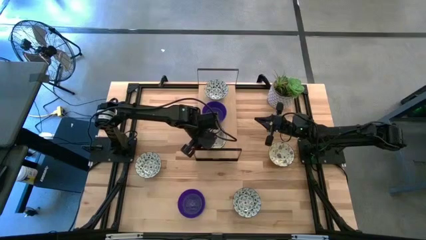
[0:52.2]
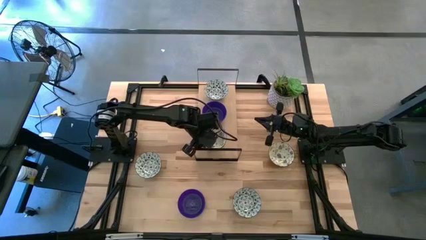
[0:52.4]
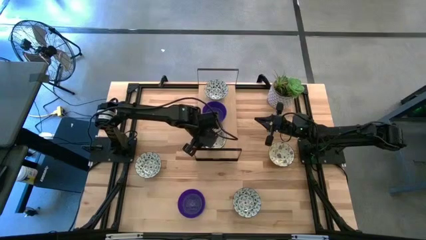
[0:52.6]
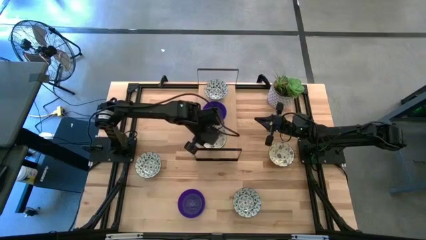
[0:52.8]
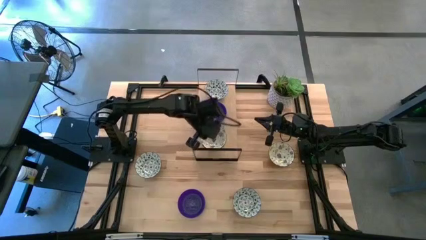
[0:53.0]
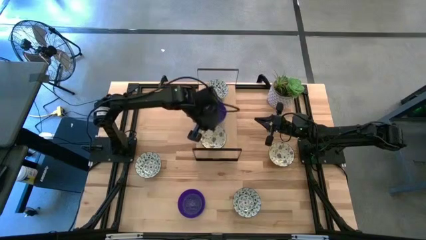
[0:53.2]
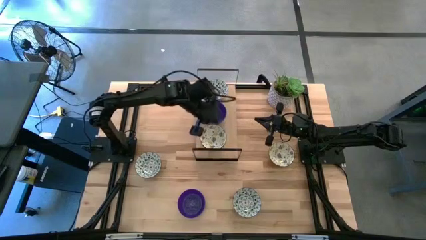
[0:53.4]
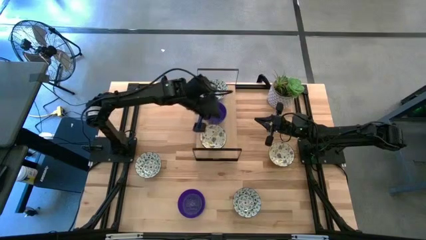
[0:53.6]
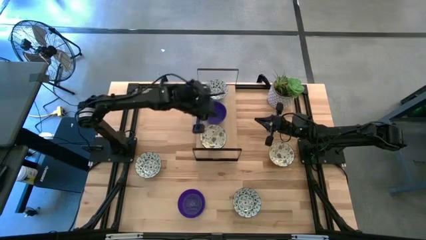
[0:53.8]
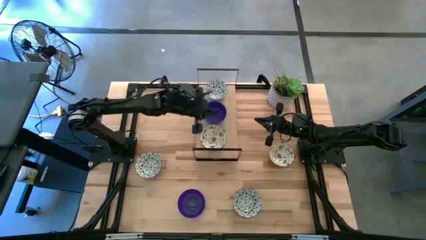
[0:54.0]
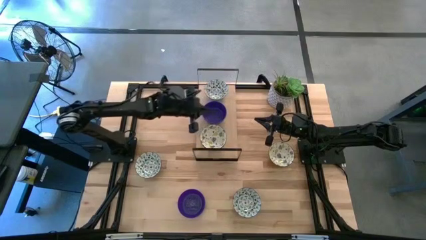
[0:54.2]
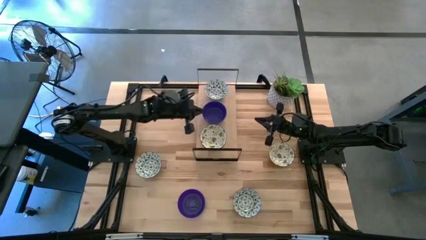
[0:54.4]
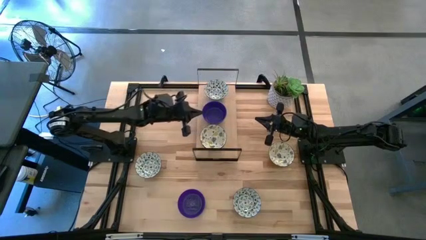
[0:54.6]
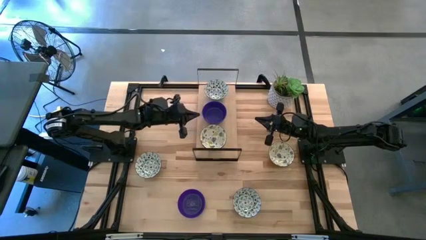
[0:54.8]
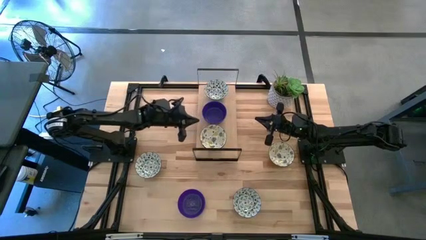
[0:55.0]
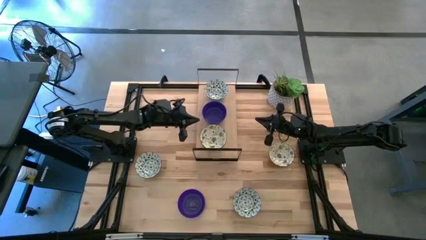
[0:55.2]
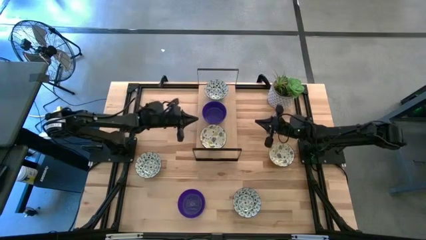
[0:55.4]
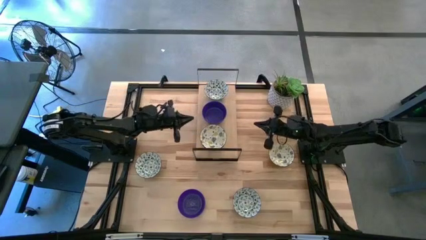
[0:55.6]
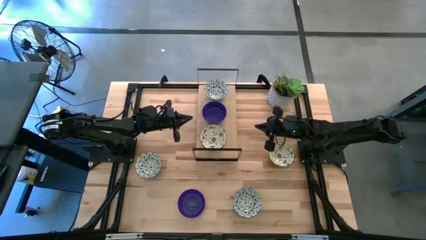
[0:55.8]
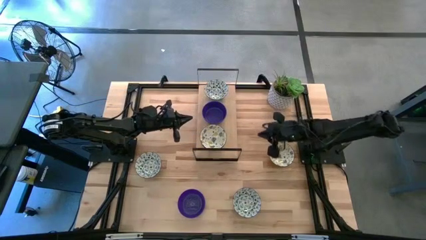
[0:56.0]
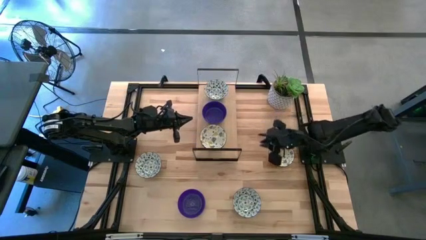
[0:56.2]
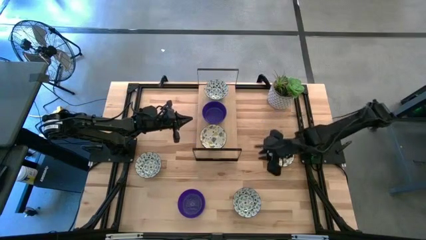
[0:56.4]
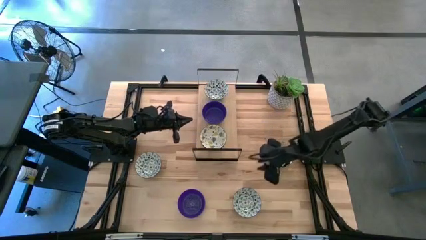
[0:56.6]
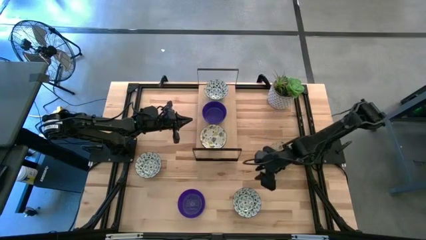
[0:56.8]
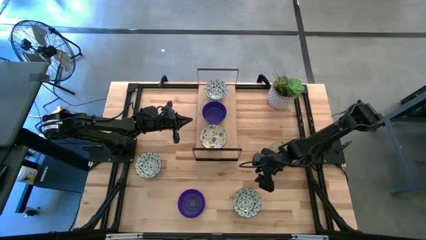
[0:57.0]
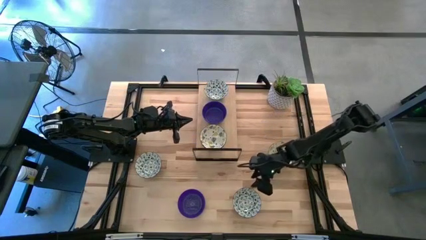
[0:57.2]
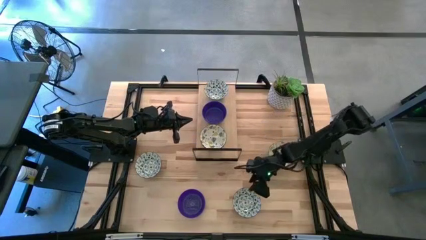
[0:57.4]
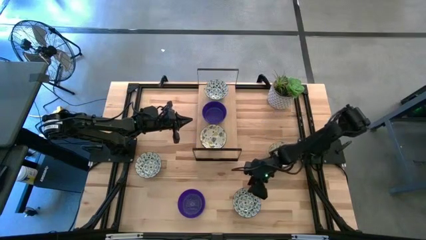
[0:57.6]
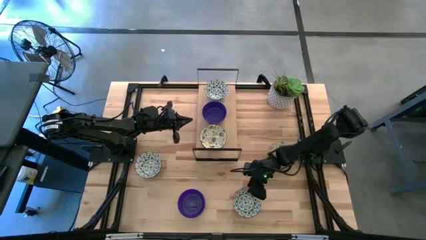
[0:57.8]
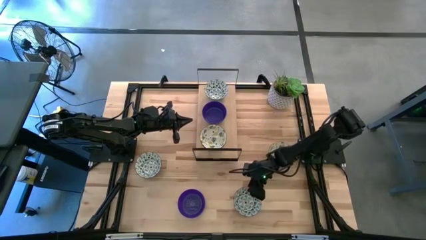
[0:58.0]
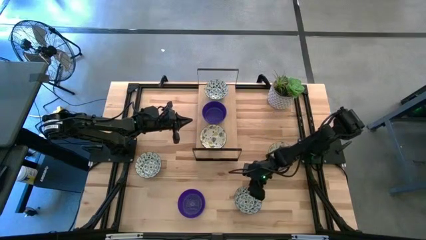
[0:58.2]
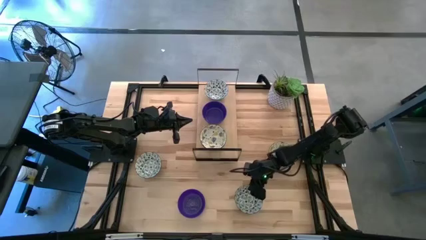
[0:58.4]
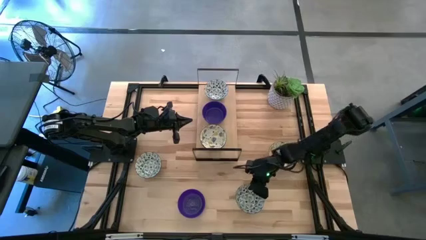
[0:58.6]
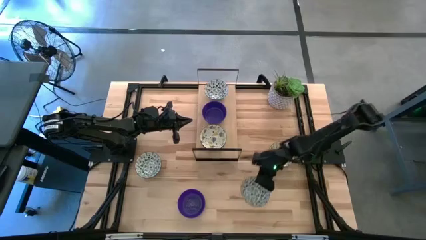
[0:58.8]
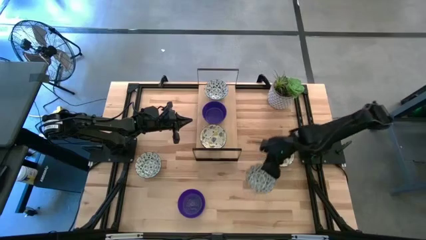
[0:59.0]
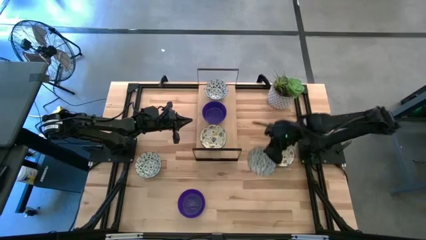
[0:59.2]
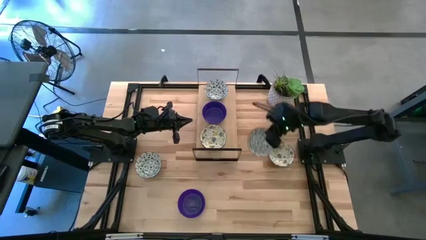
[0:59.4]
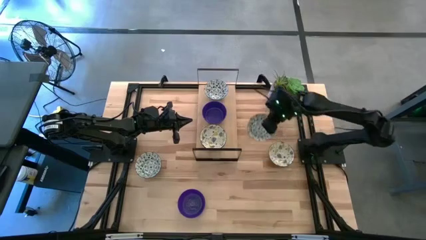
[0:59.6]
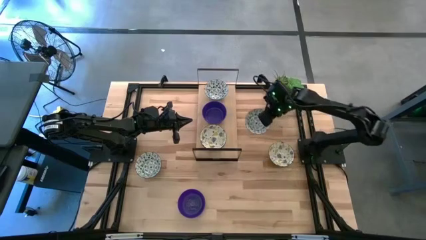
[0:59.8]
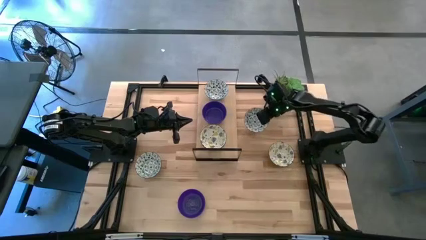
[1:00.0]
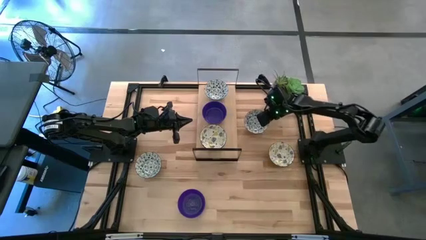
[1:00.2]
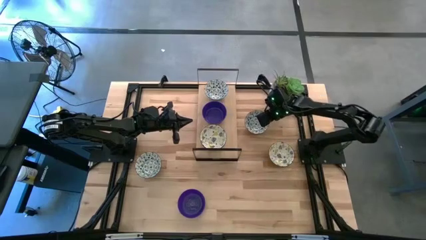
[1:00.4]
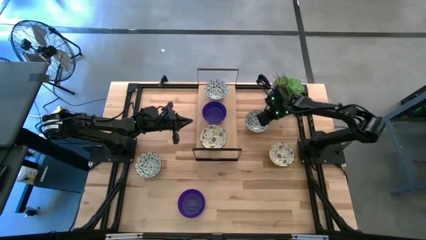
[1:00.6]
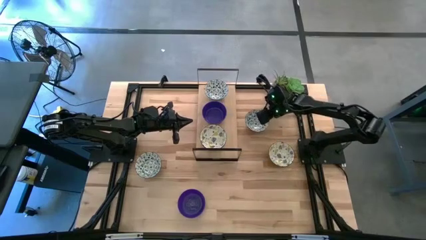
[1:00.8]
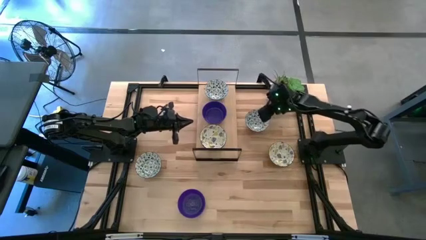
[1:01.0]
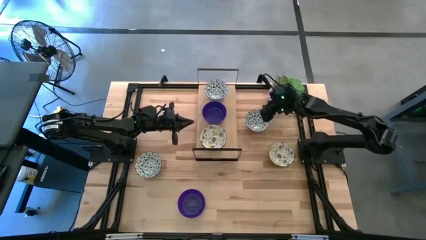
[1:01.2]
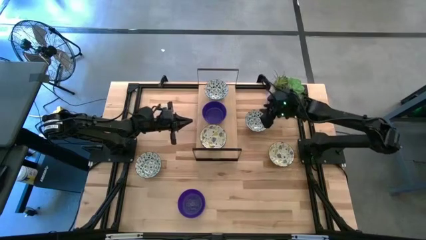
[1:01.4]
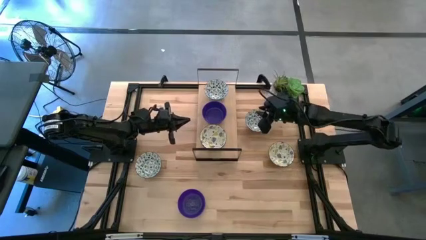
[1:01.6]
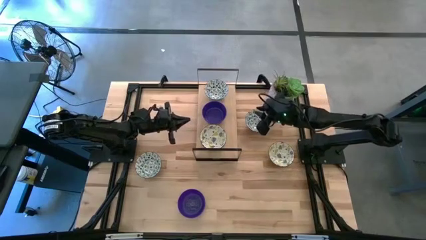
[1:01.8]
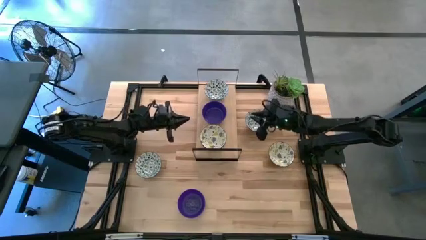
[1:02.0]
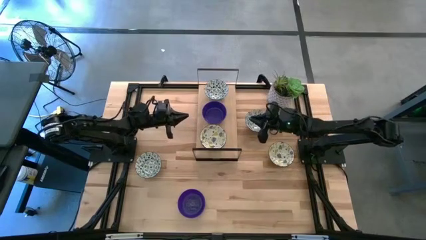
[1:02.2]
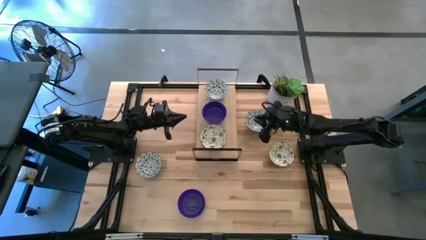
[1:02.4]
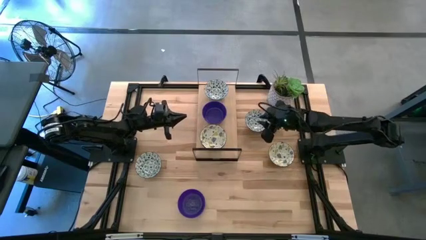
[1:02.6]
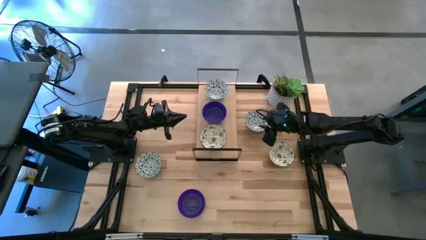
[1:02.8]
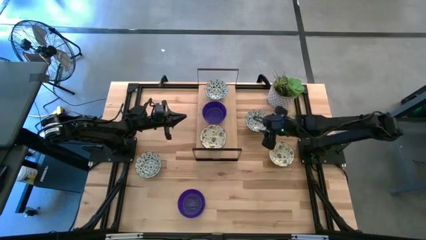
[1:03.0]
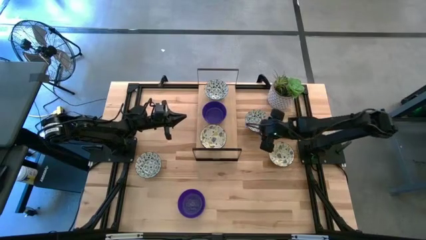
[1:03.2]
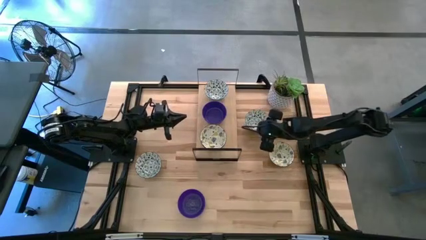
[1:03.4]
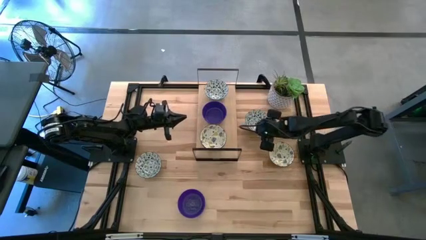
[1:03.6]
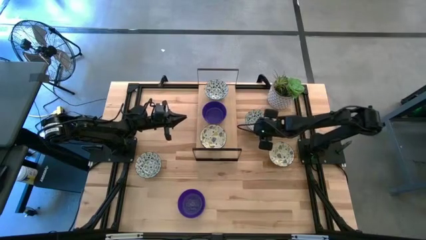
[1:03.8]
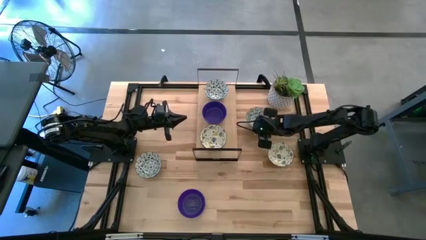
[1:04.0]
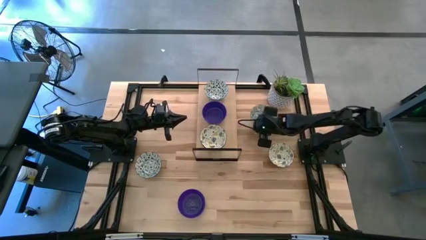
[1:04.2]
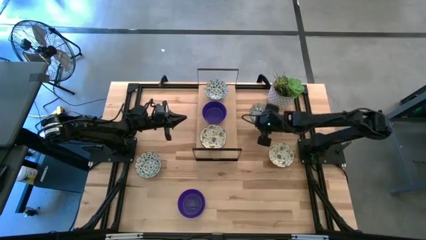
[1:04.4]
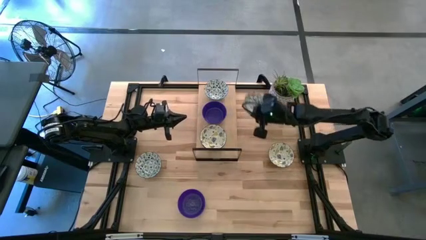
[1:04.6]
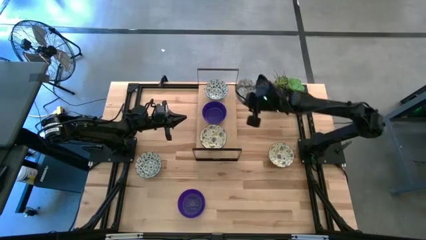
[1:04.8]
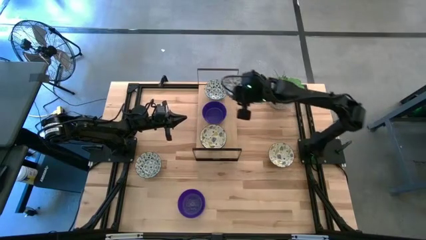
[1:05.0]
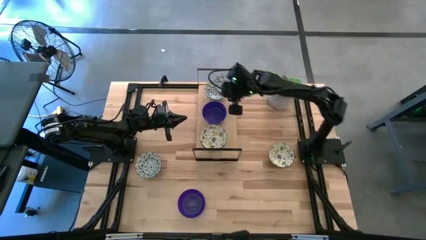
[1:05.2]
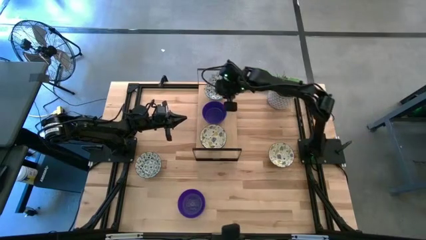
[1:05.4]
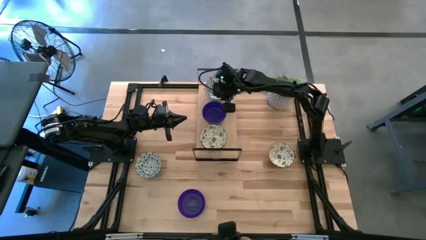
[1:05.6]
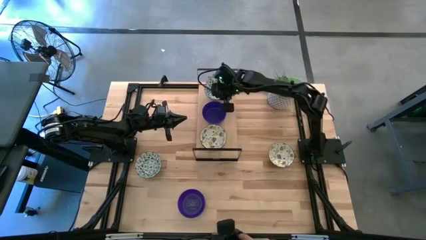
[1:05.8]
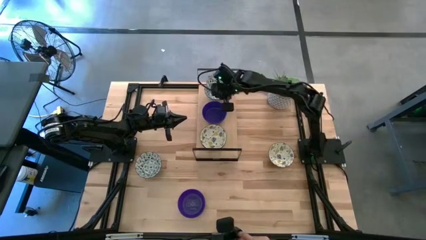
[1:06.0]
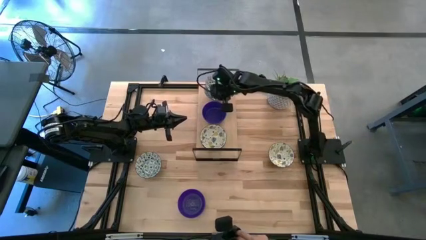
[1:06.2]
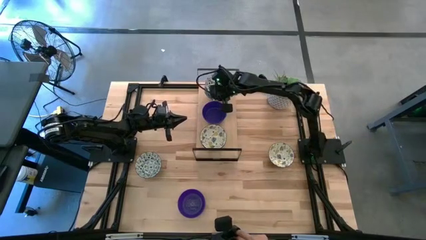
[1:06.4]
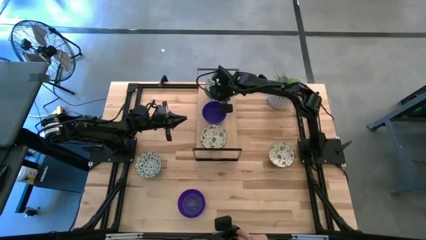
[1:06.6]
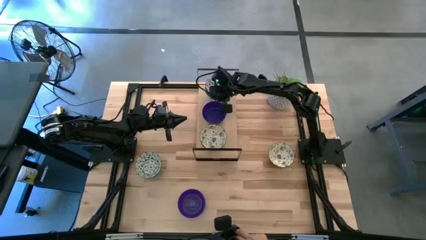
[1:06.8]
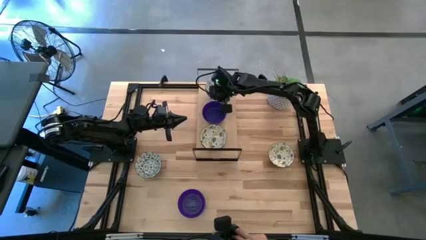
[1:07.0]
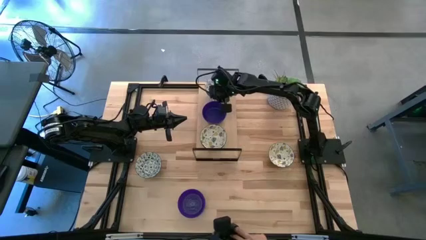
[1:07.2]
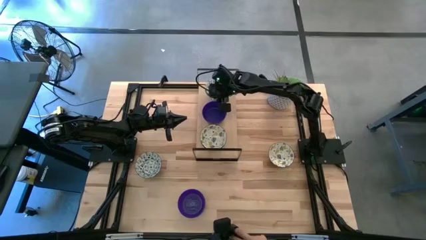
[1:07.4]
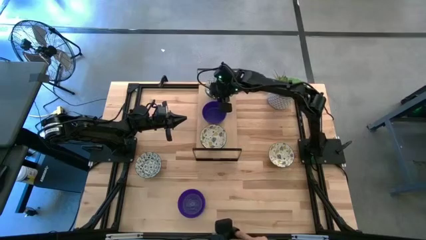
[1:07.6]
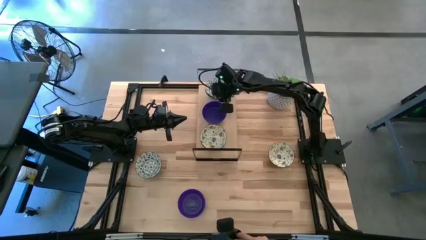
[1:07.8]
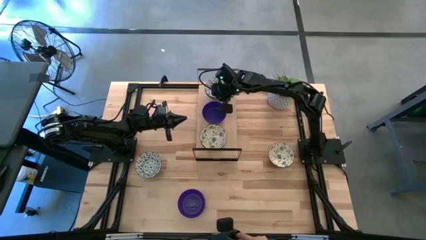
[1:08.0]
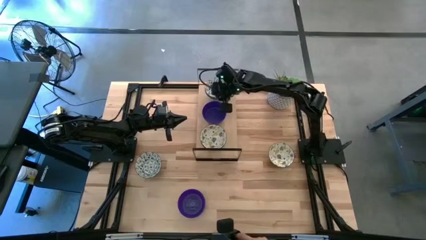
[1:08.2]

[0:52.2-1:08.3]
Task: Pick & Place Mini bowls
Stack the right blue patterned bowl on top of the blue patterned bowl on the shelf
